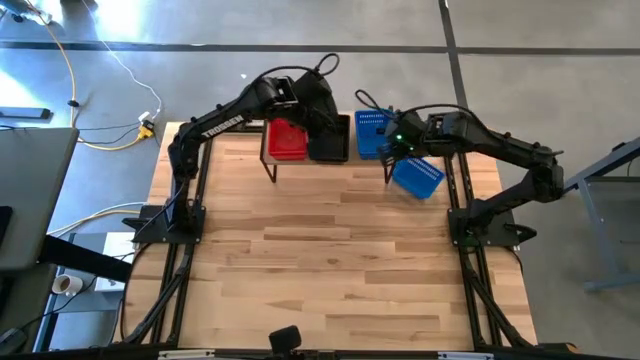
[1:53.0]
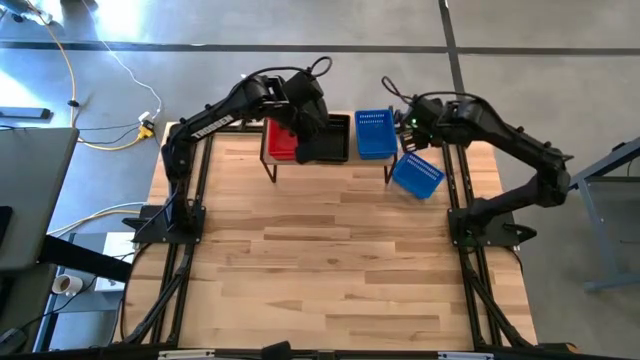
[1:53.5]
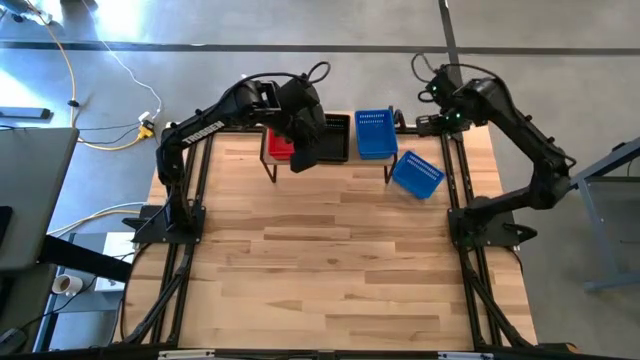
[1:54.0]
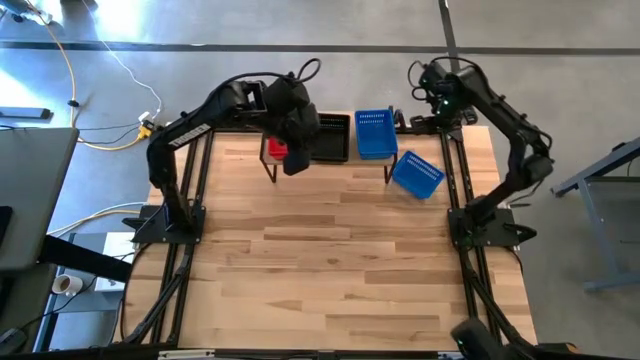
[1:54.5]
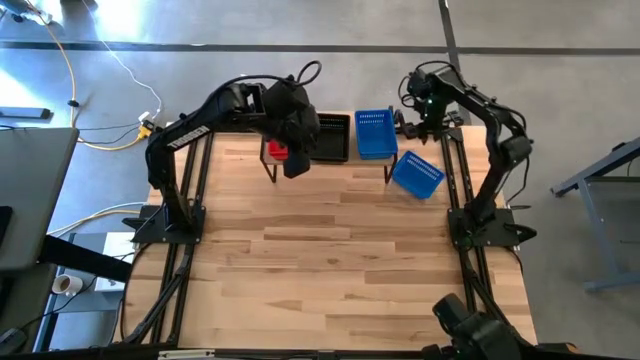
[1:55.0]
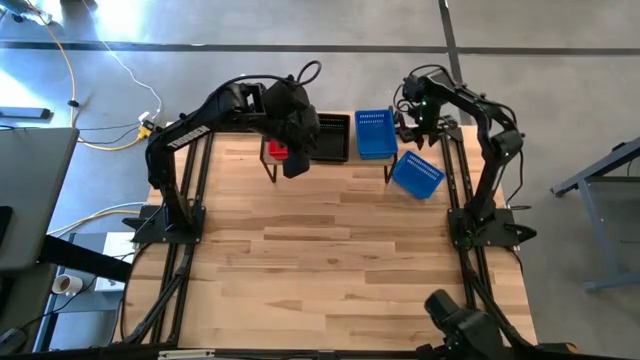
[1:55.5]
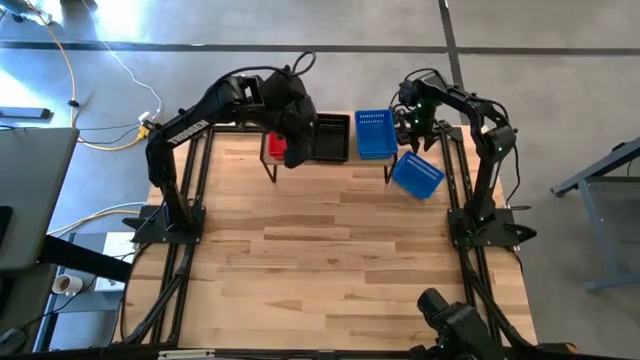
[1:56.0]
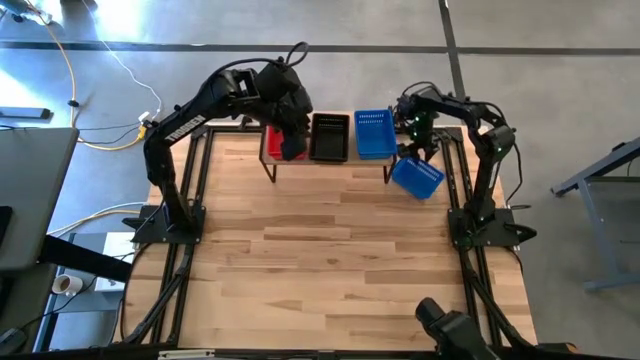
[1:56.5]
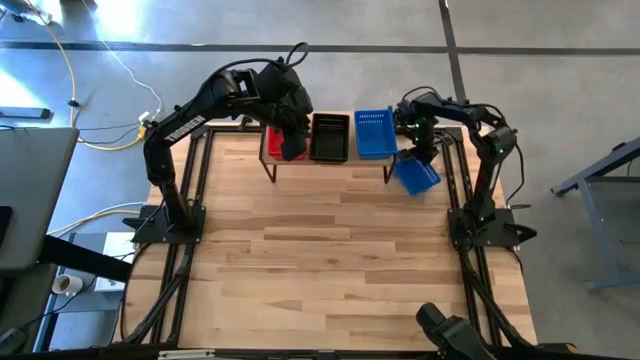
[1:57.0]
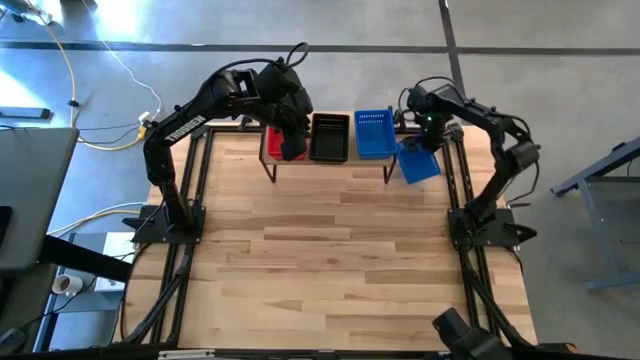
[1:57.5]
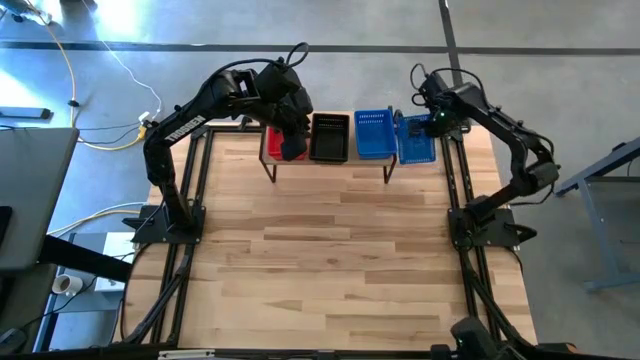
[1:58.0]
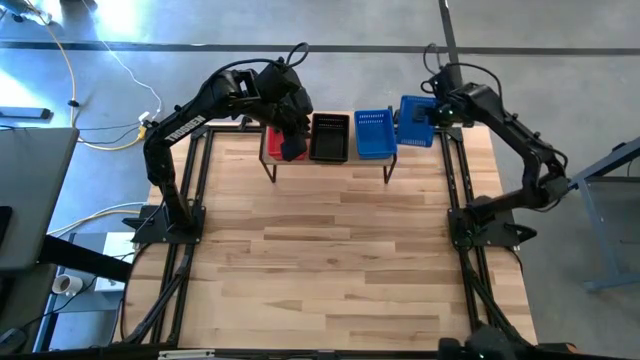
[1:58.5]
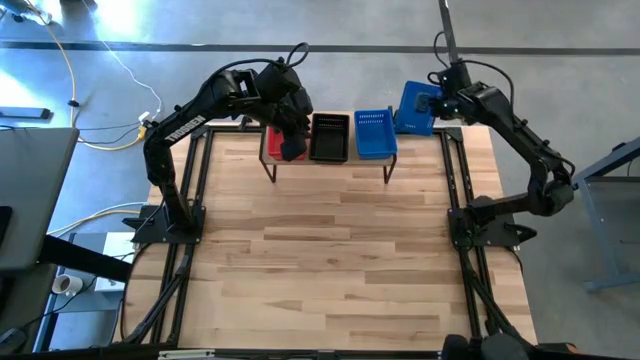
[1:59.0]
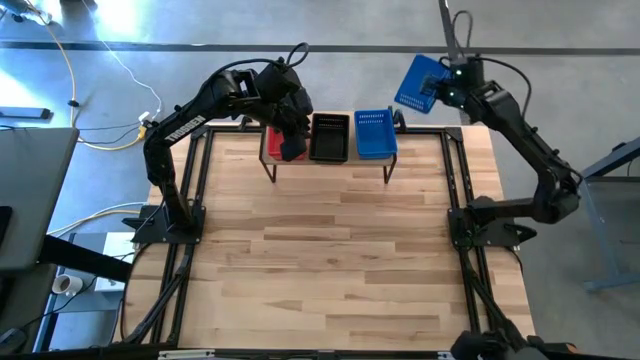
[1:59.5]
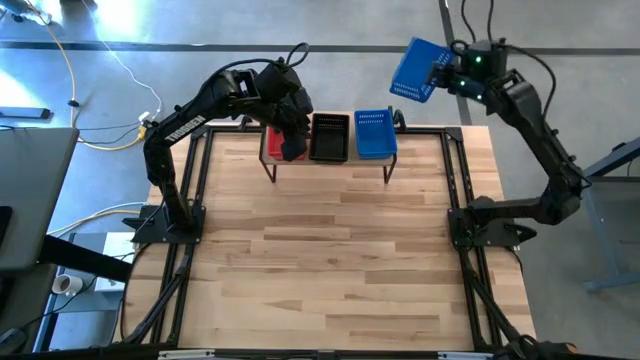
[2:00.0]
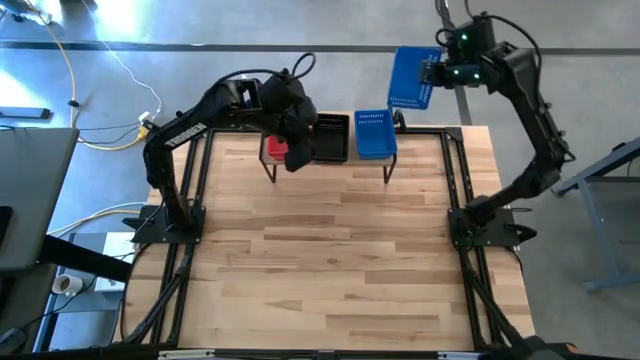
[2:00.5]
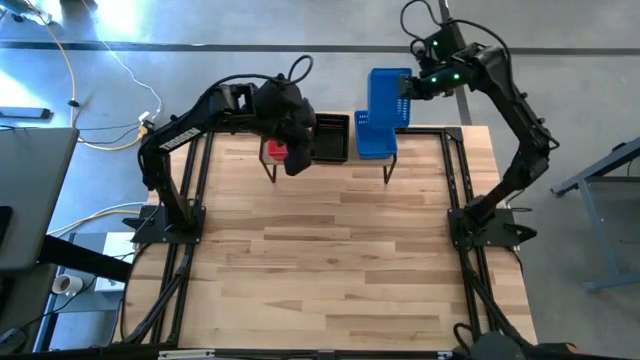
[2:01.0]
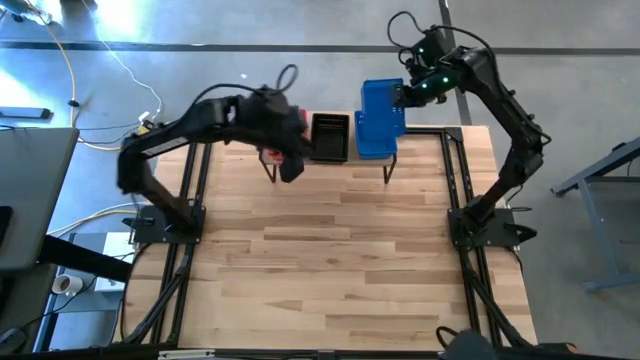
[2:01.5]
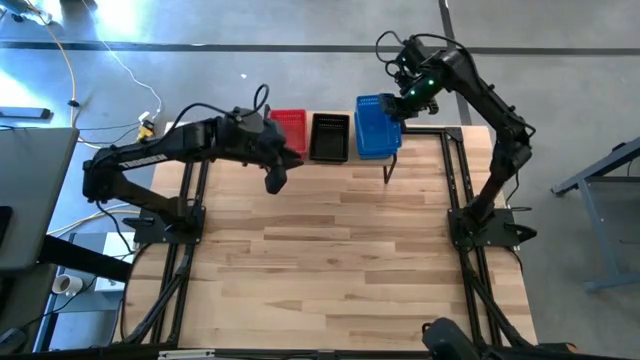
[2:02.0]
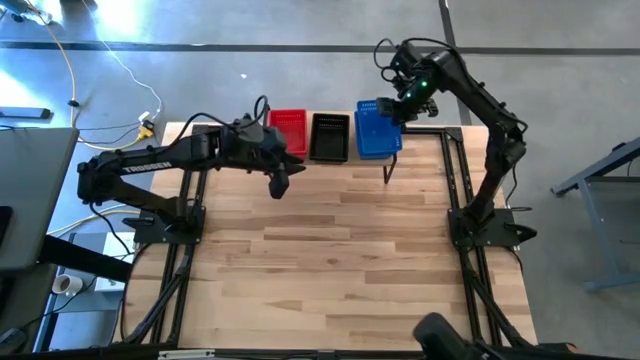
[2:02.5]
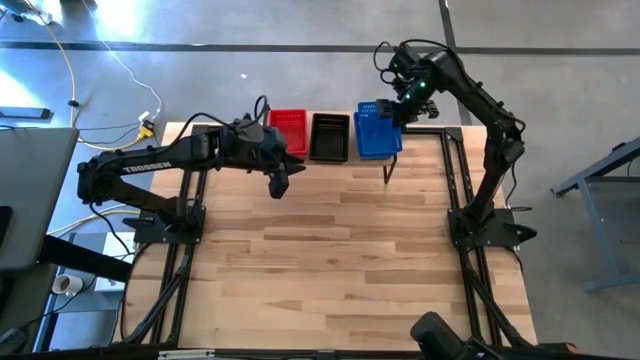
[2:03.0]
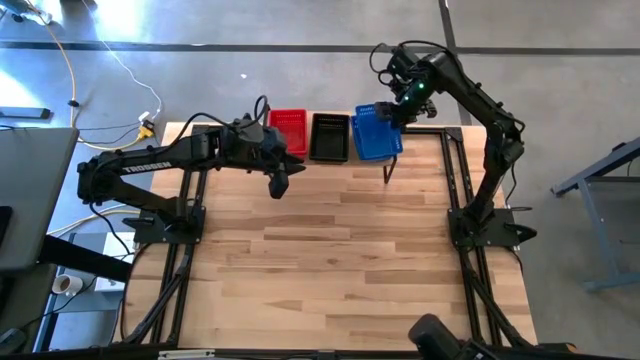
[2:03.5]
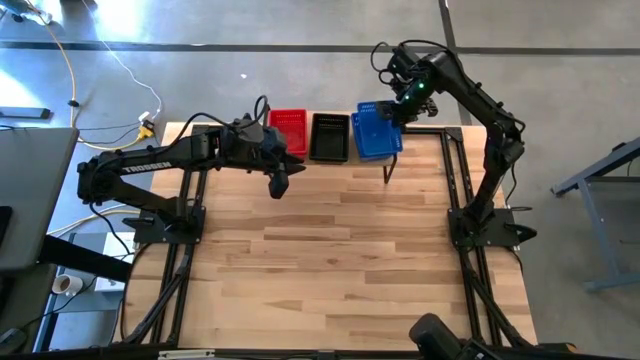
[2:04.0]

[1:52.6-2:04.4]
Task: Stack baskets on shelf by color
Stack the blue bin on top of the blue bins on the shelf

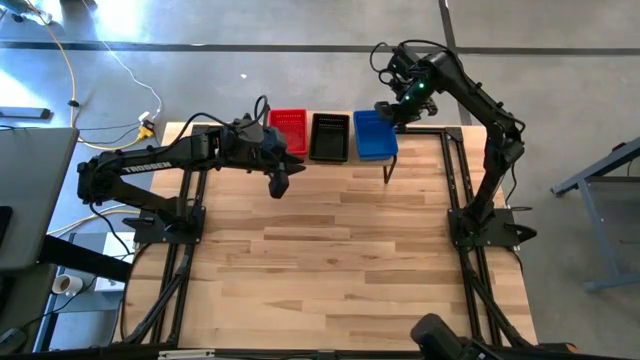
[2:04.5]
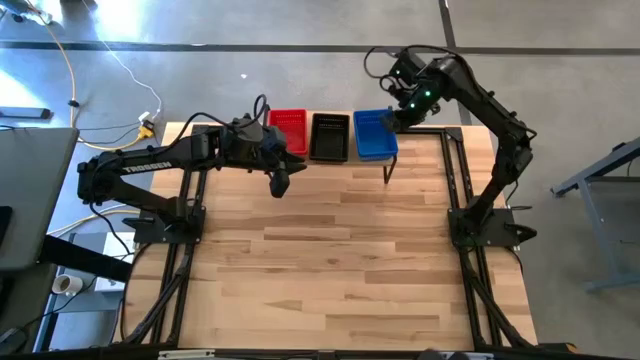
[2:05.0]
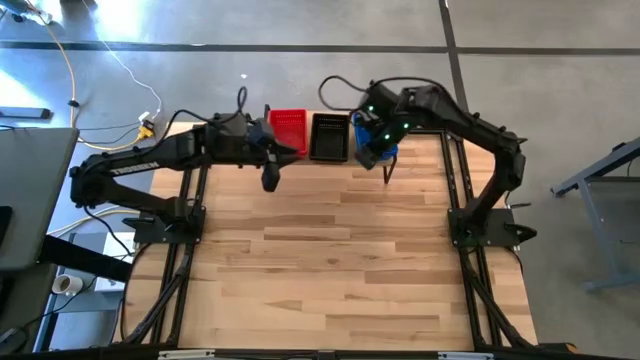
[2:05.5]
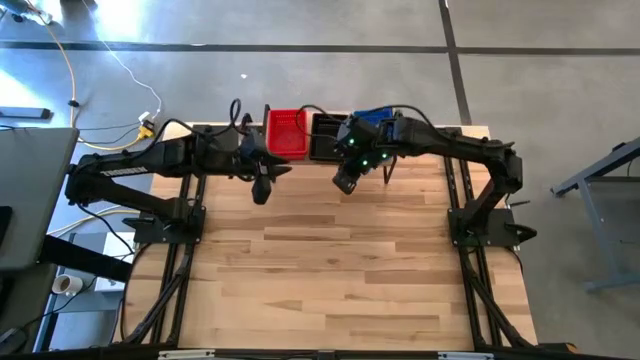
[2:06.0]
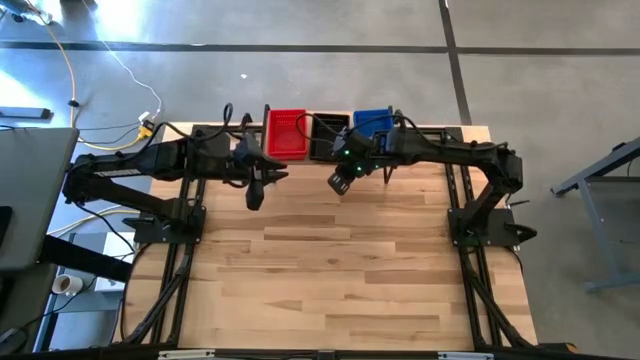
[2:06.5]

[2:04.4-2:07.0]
Adjust the black bins on the shelf

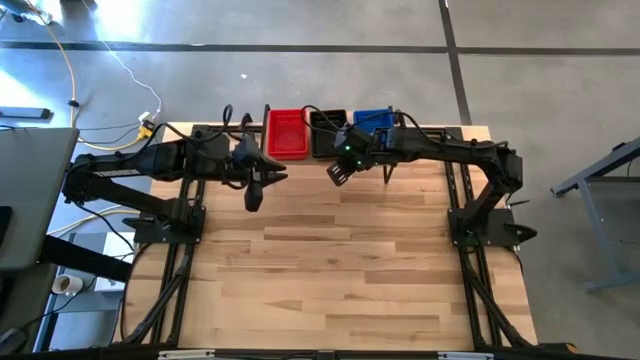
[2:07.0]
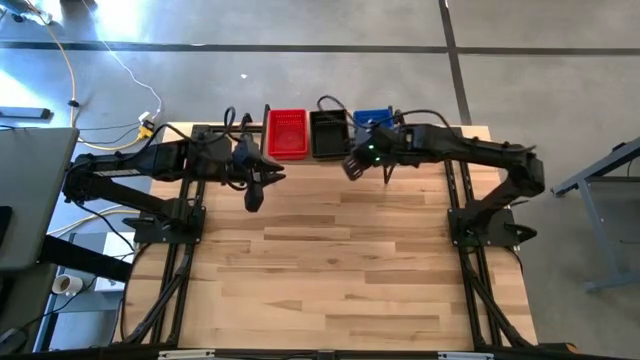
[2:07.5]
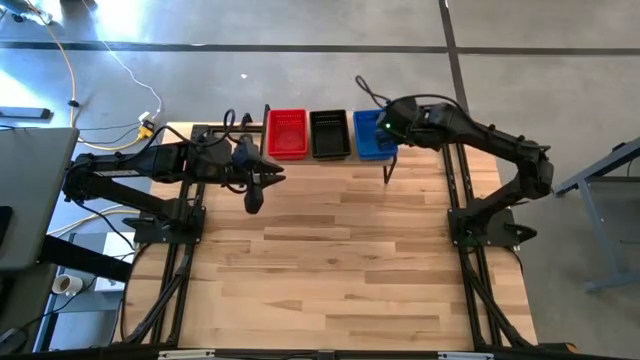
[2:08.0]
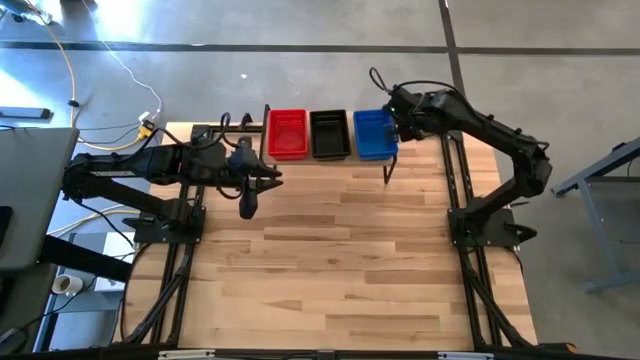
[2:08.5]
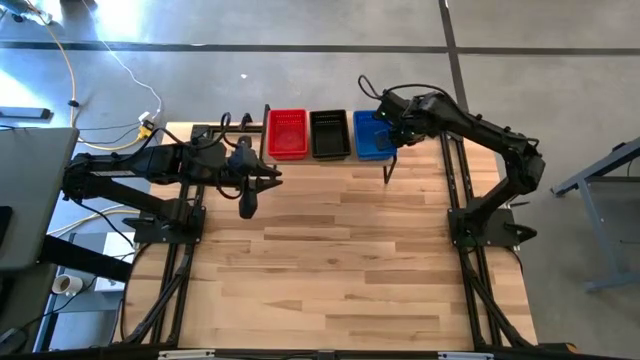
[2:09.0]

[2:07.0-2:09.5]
Adjust the blue bins on the shelf

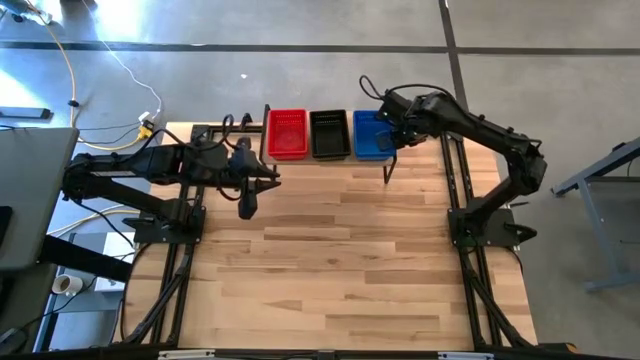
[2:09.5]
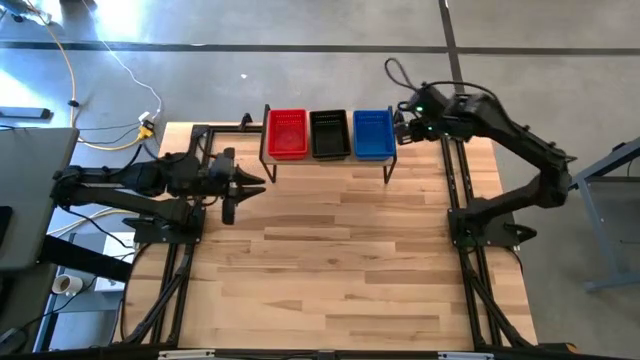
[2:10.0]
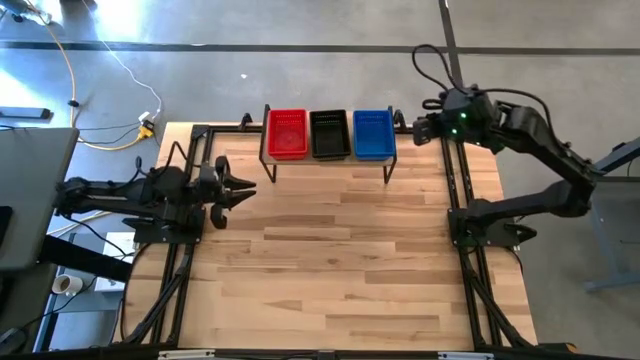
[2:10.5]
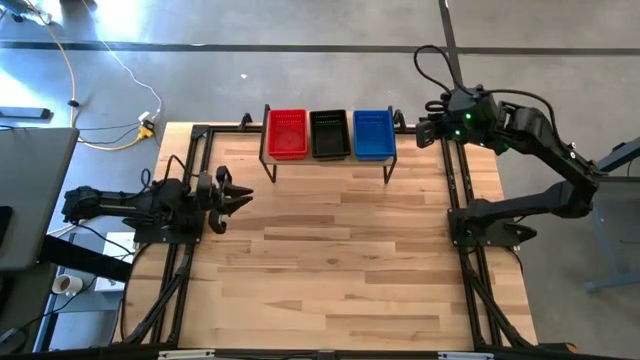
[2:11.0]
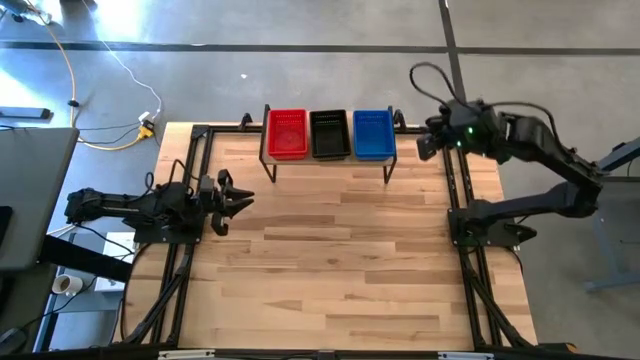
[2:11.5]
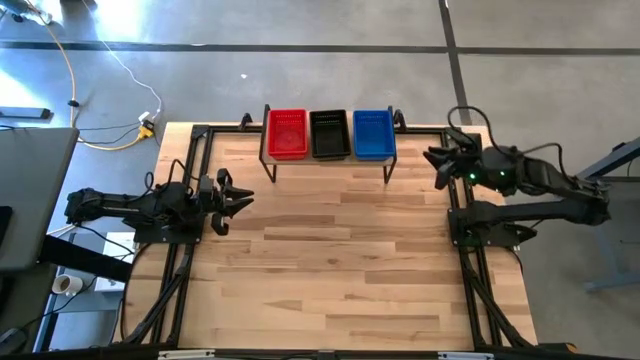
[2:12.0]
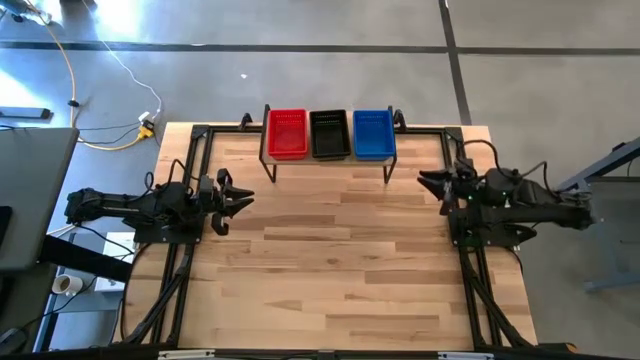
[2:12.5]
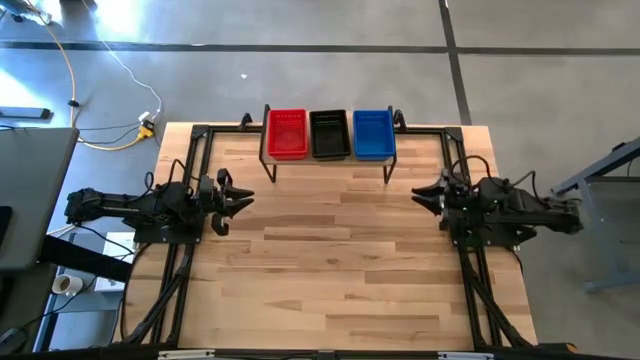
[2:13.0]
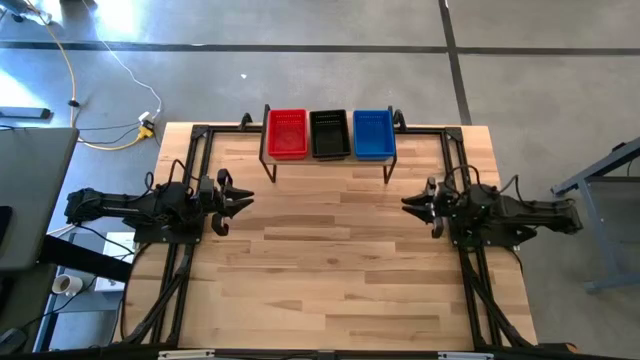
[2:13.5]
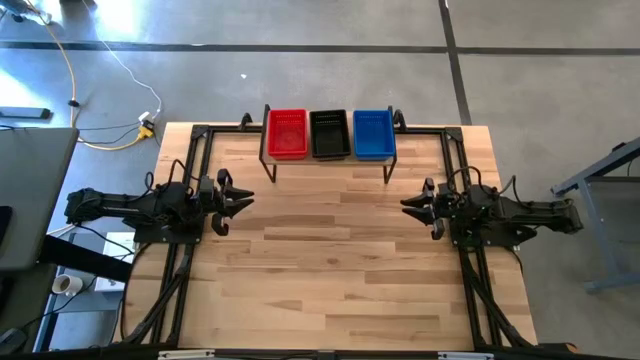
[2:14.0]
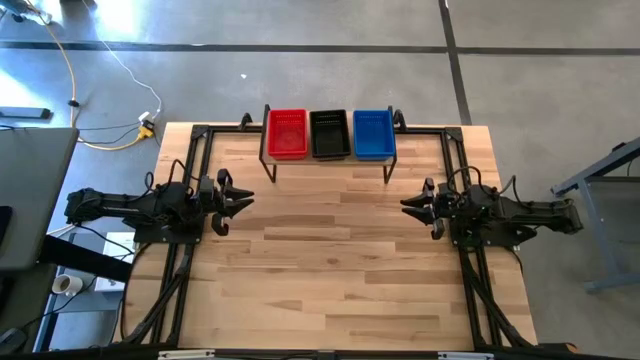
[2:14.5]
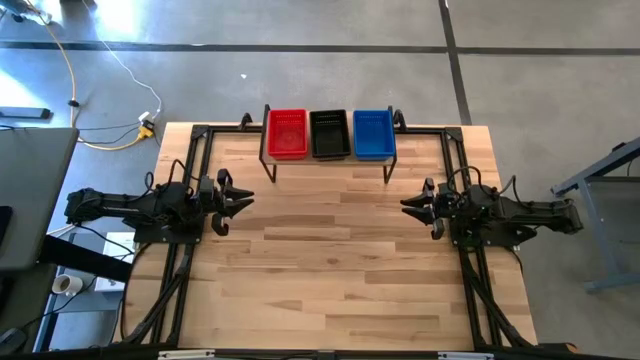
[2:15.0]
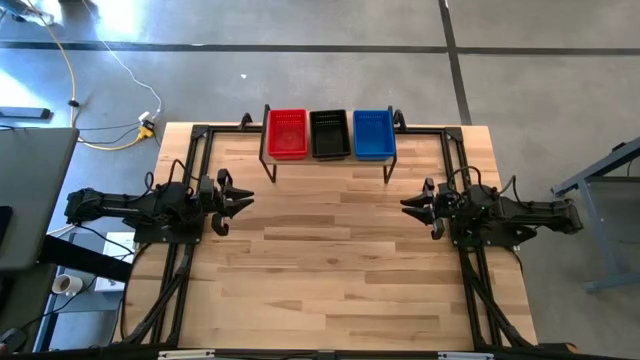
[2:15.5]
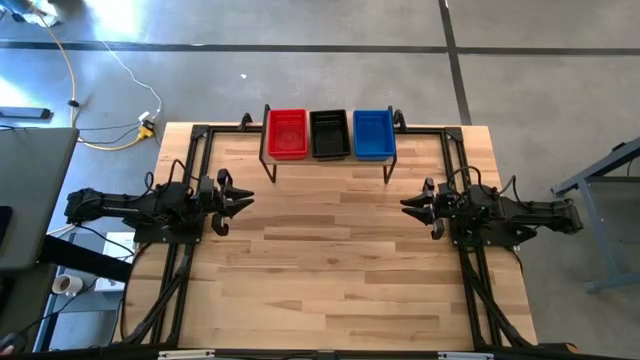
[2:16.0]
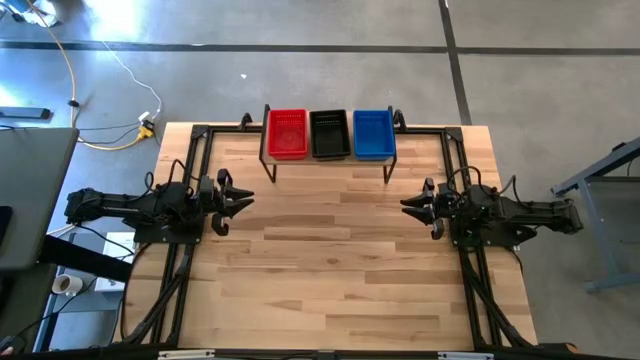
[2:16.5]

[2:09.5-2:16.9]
Return to Home Position
